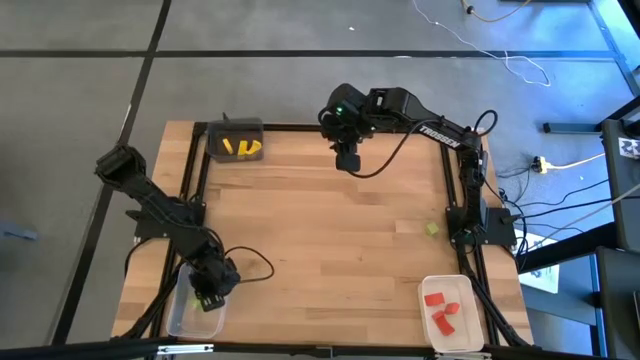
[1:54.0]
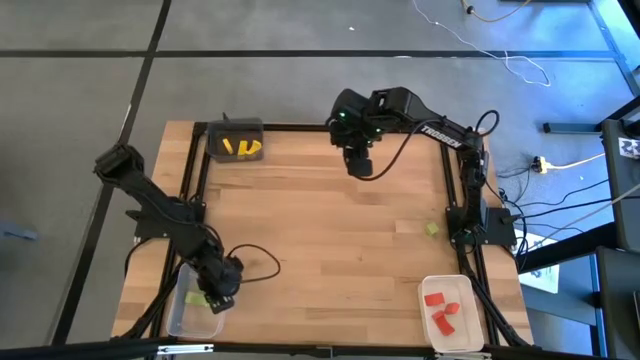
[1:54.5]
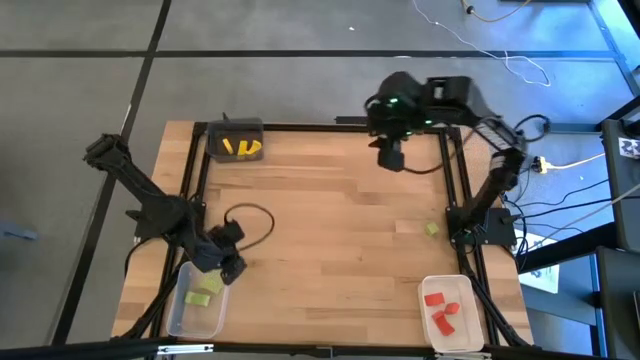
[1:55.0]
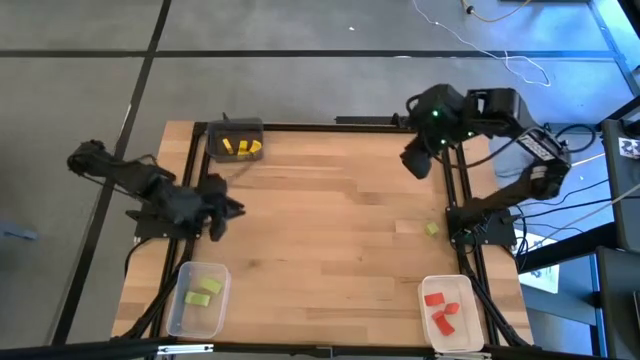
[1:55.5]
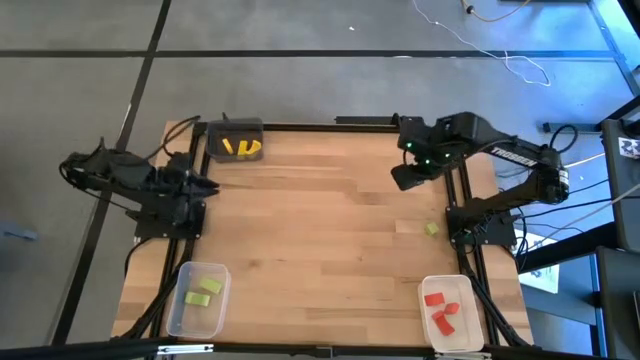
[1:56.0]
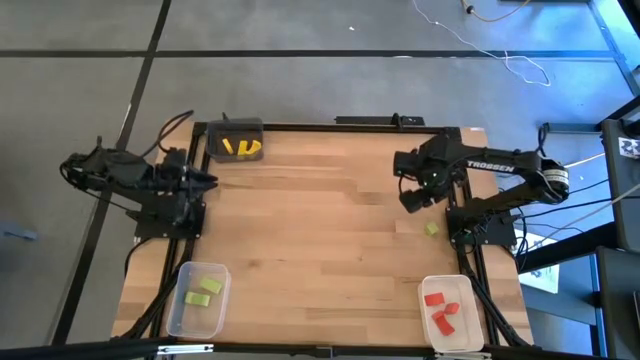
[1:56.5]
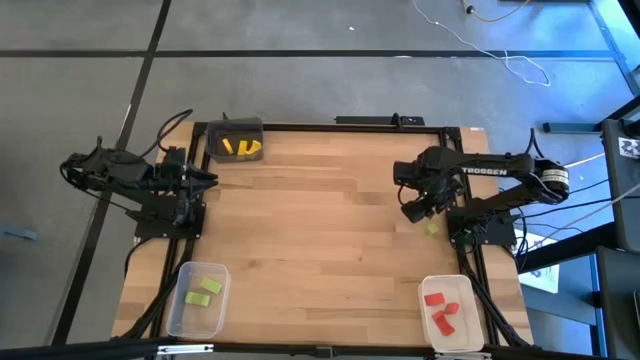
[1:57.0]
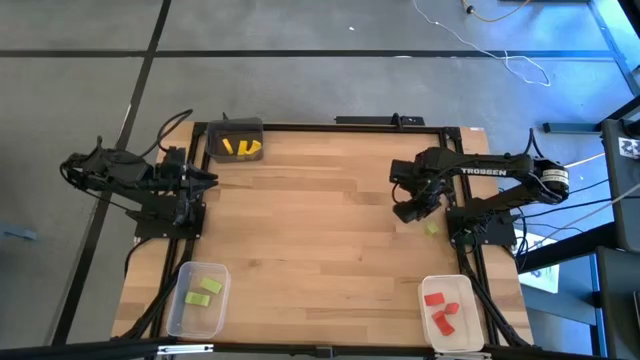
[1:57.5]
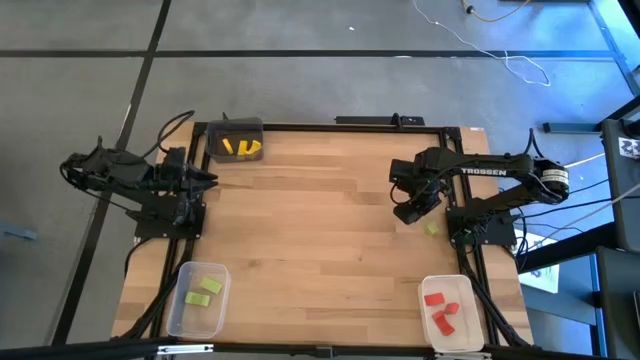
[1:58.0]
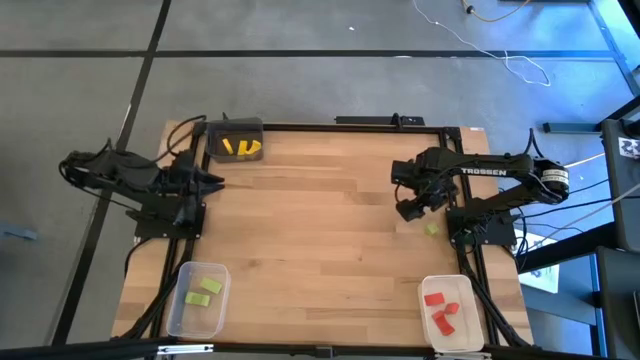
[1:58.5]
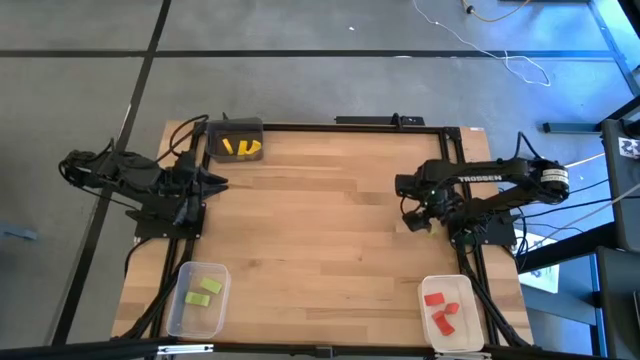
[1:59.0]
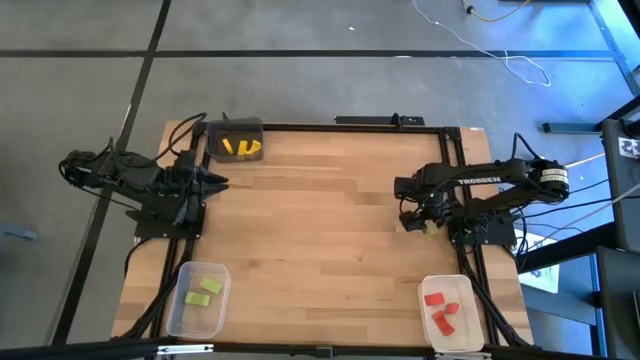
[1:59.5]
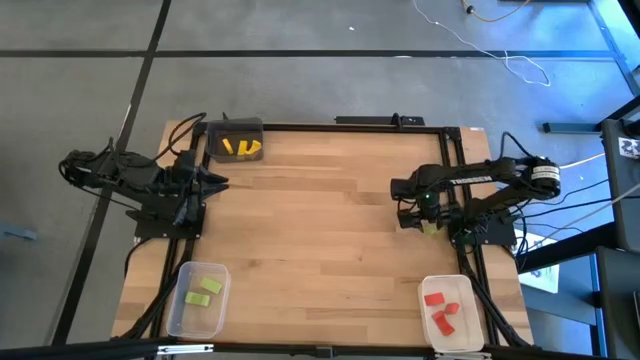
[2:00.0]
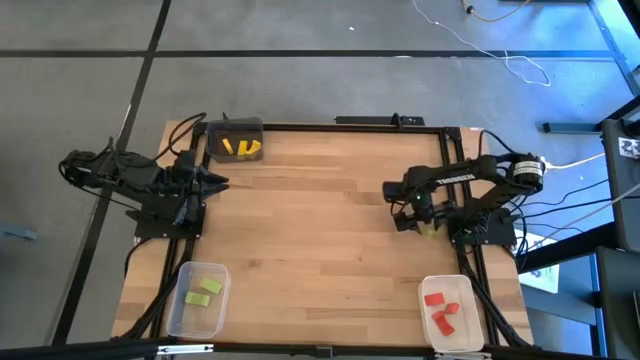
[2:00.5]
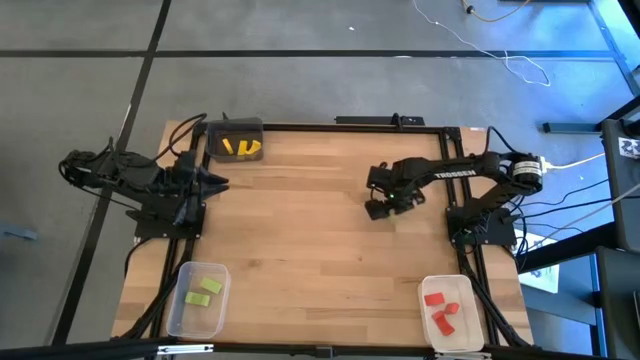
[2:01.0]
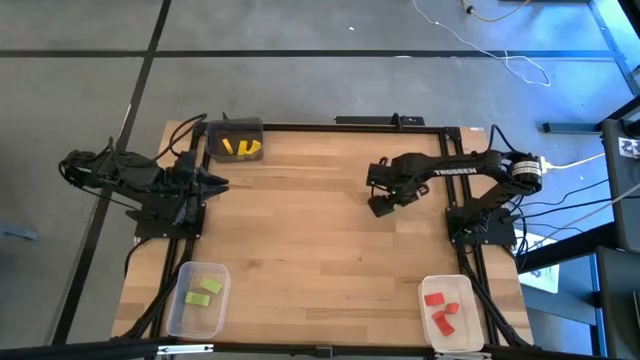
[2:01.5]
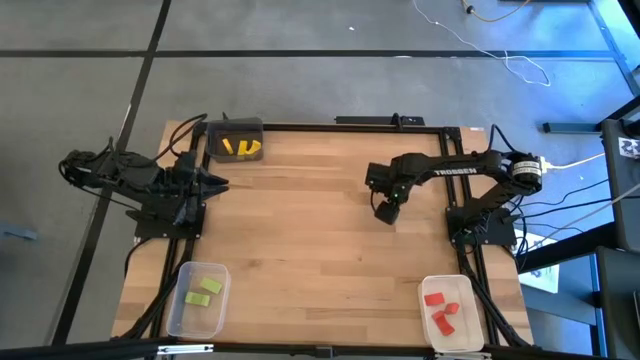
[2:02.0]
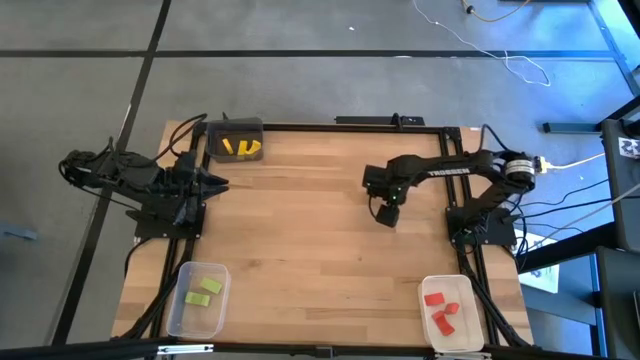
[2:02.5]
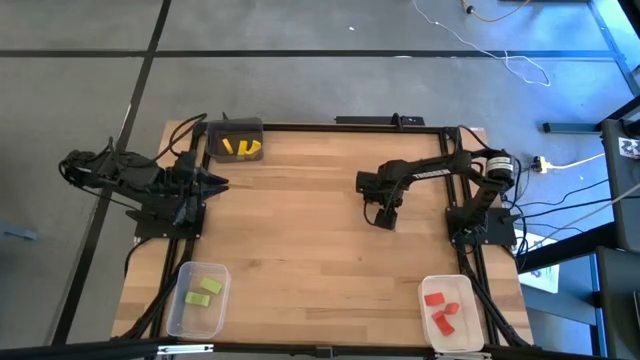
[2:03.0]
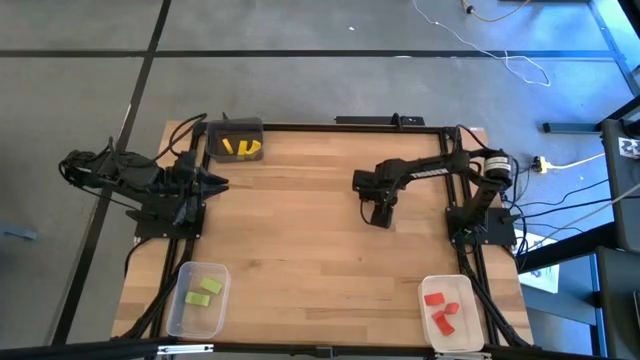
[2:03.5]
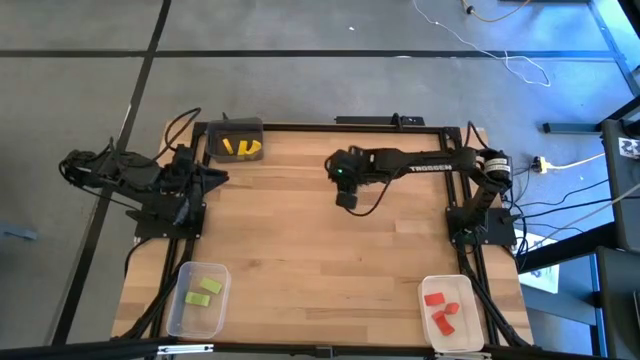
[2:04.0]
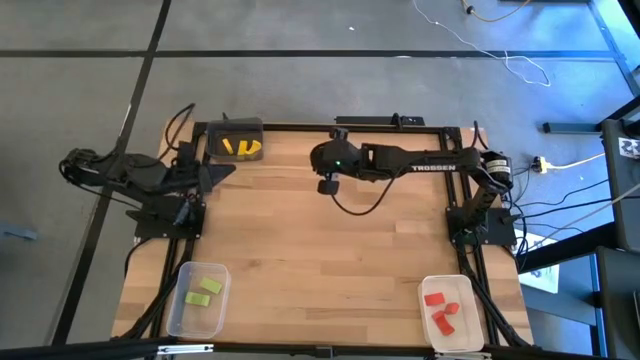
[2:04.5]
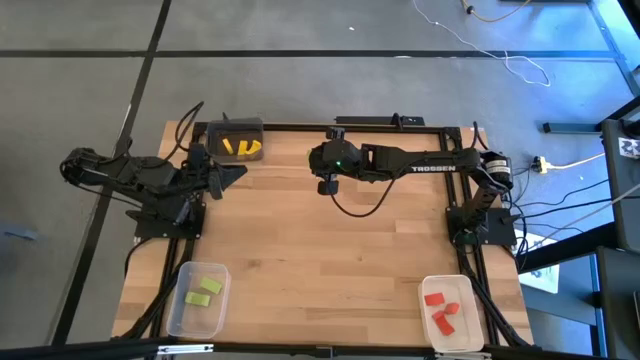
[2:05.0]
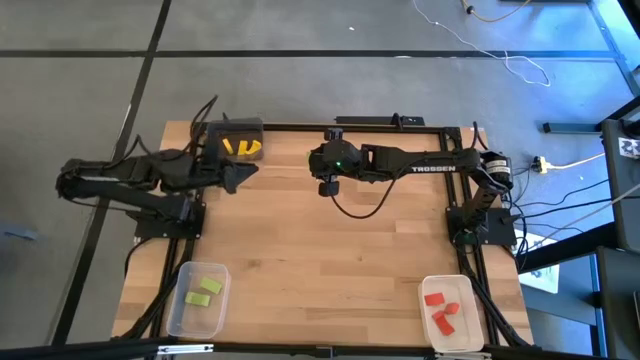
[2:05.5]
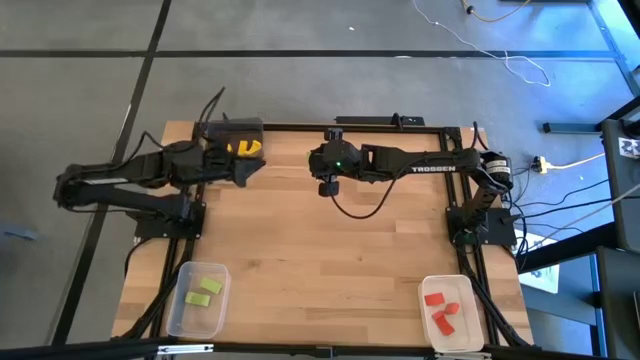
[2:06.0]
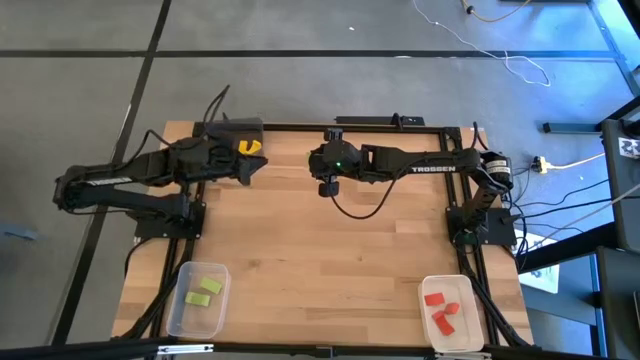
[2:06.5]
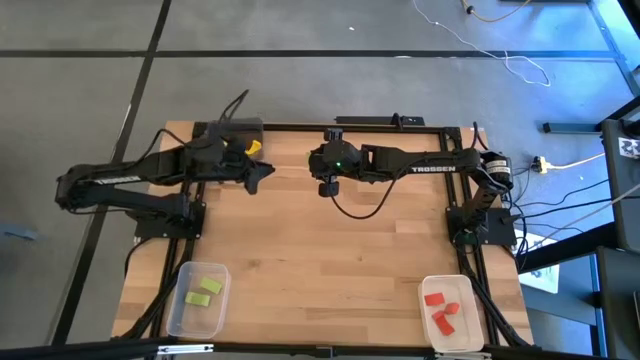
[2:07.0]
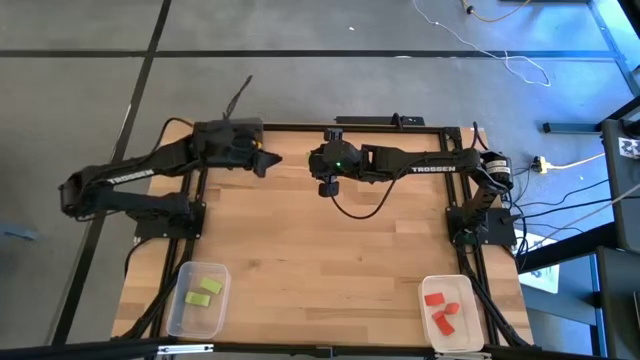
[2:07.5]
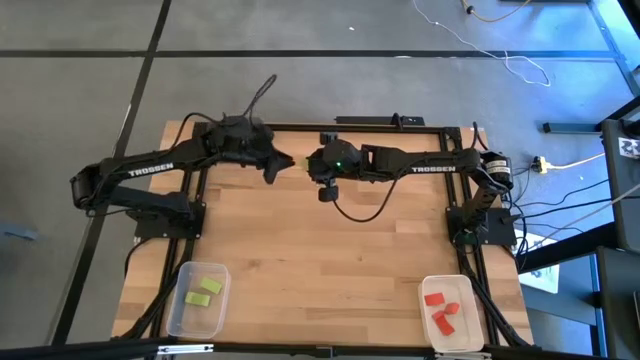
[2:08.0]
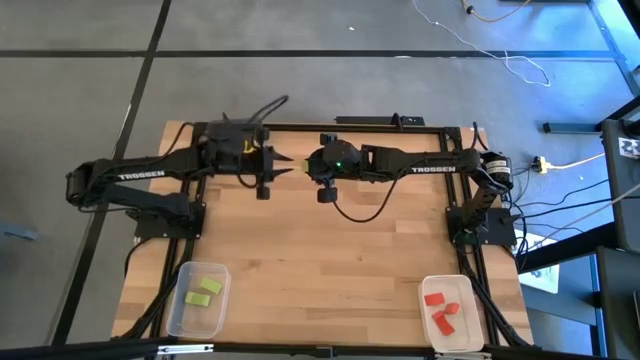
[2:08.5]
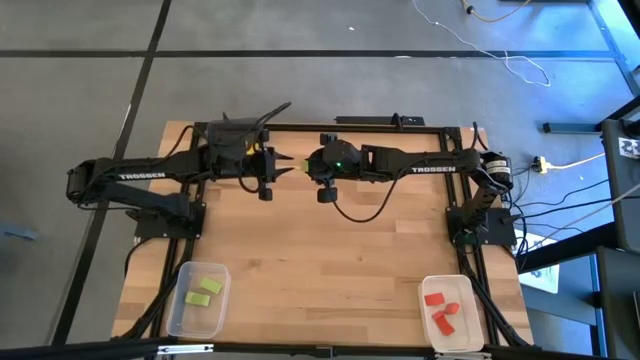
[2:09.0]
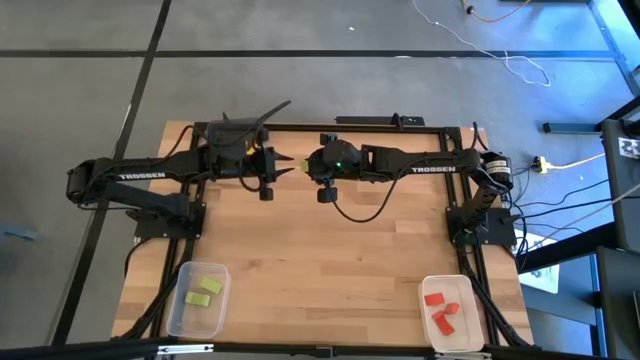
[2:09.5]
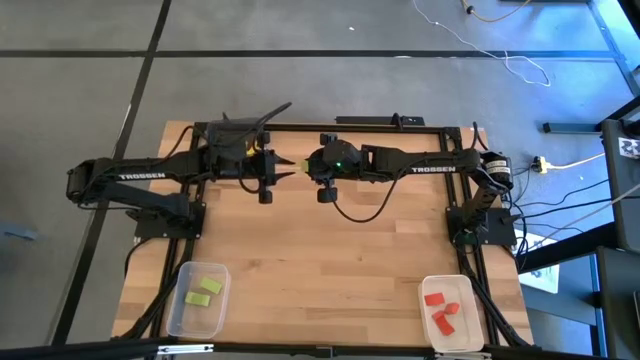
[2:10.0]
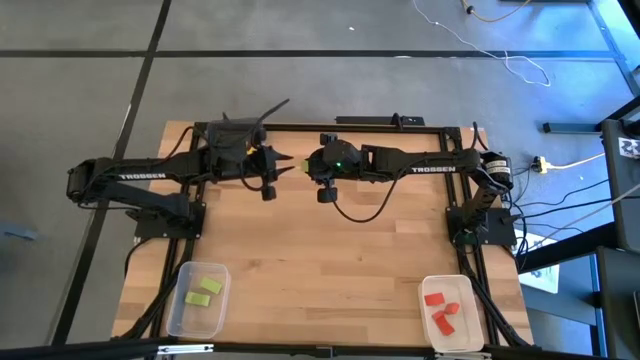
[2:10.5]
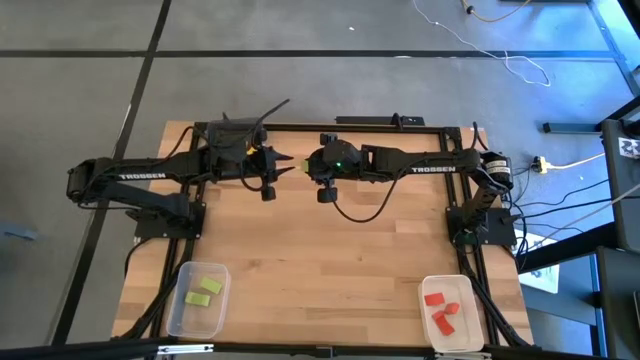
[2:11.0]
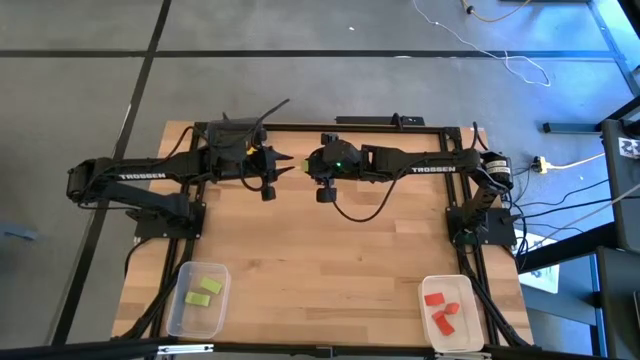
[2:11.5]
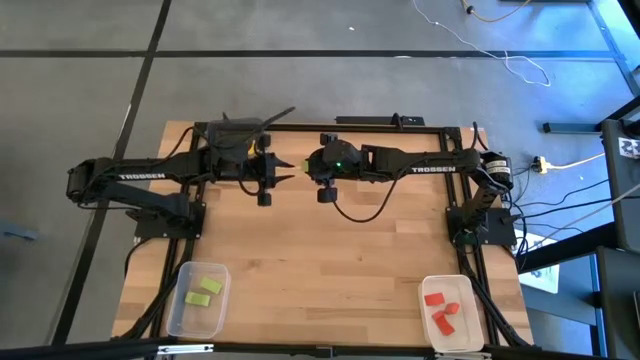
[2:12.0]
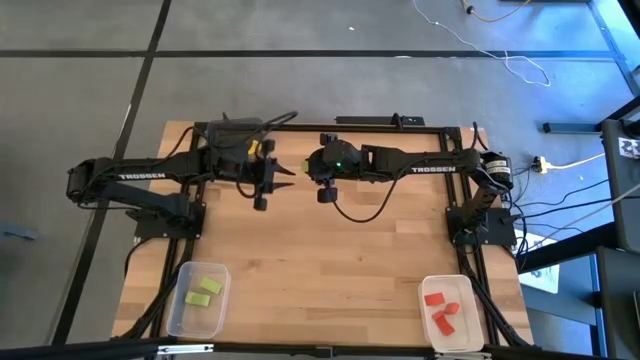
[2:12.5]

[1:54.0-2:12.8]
Task: Sort & place blocks by color
Put the green block into the transparent bin

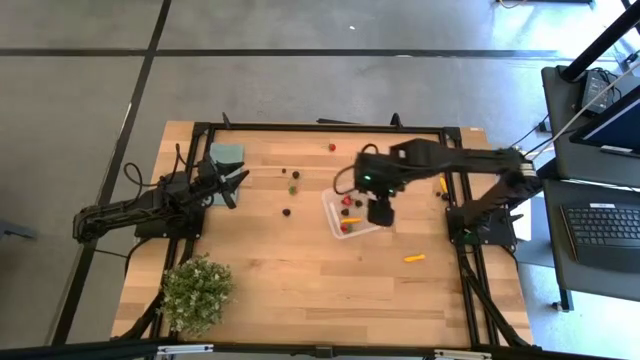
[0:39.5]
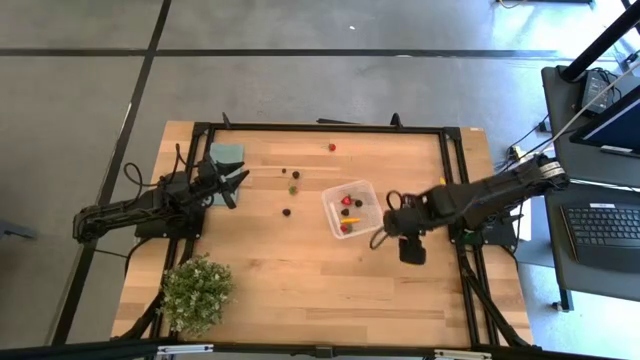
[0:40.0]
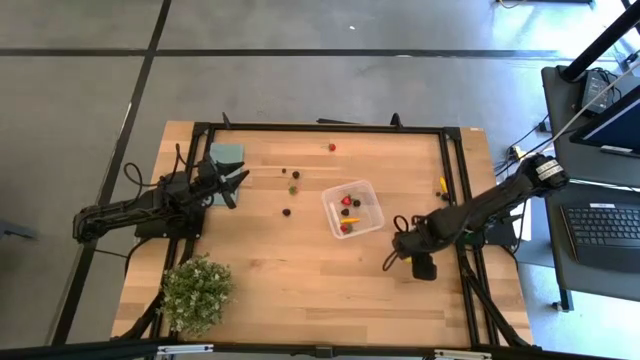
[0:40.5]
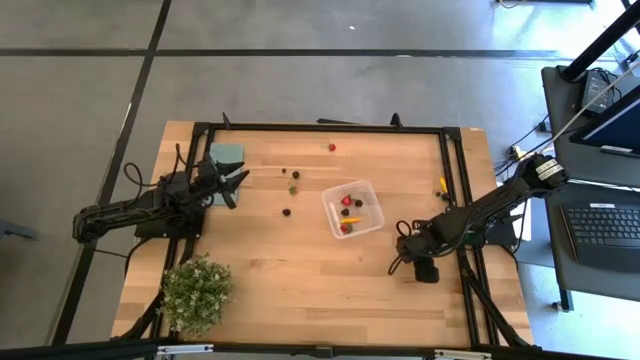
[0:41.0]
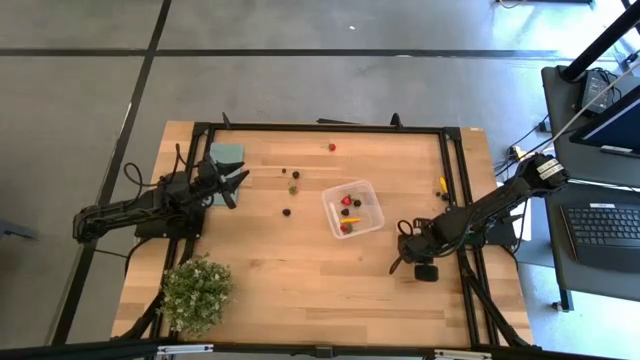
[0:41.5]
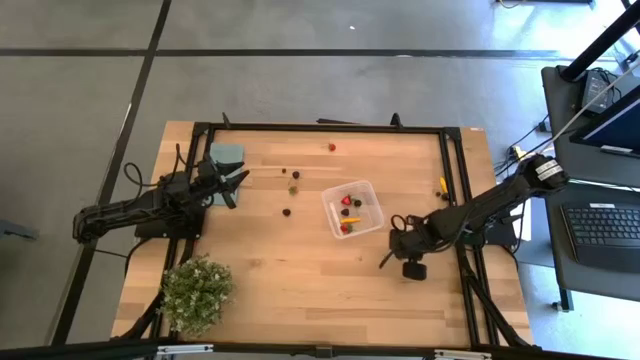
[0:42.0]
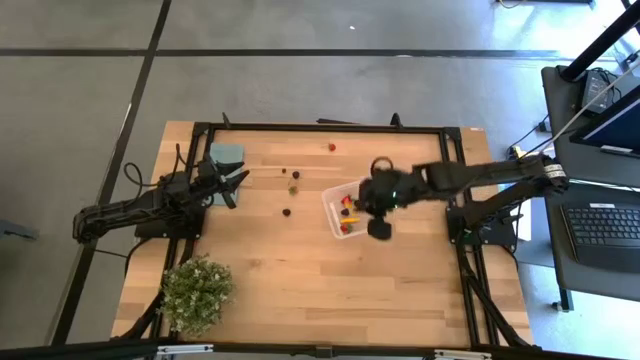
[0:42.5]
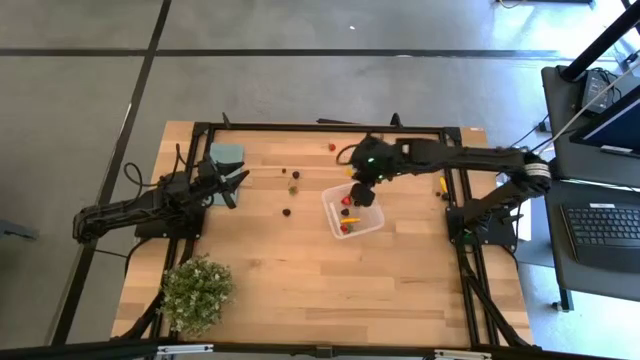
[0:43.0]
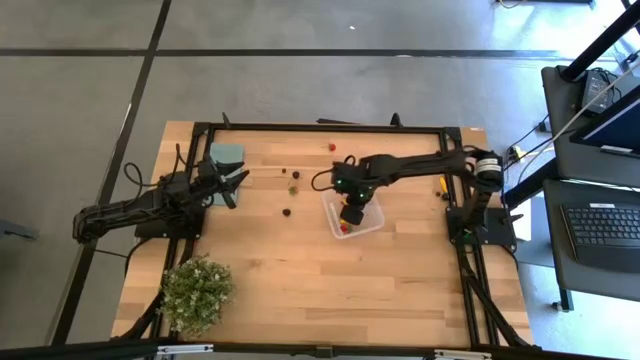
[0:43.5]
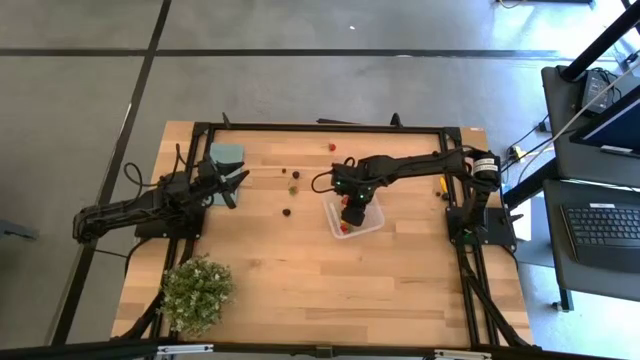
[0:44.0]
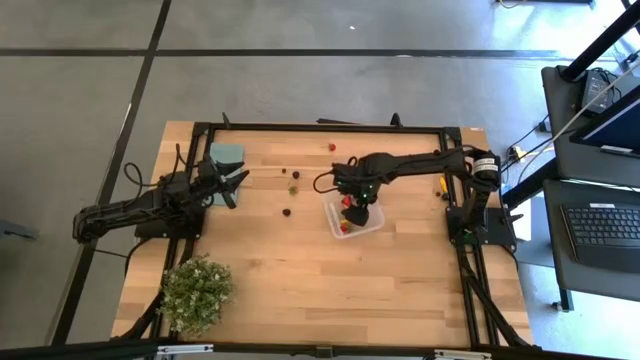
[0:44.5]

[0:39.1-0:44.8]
Task: Pick and placing Produce into tupperware
Put the bottom corn into the transparent bin
